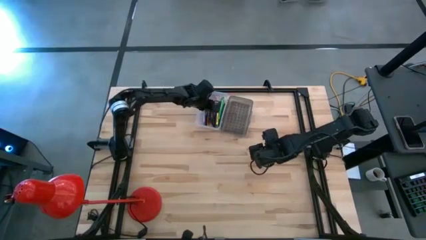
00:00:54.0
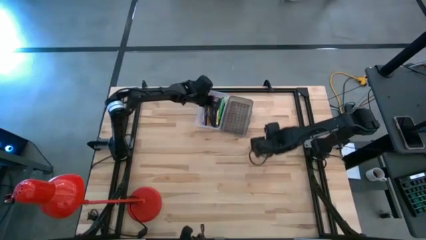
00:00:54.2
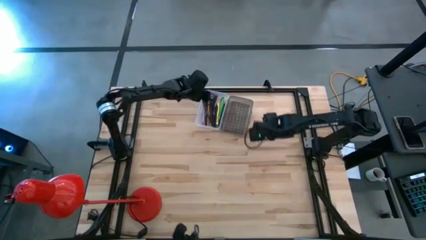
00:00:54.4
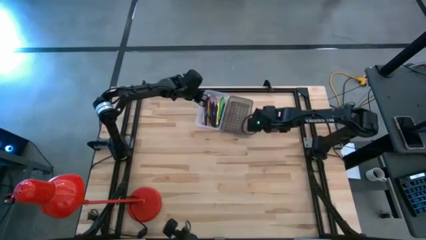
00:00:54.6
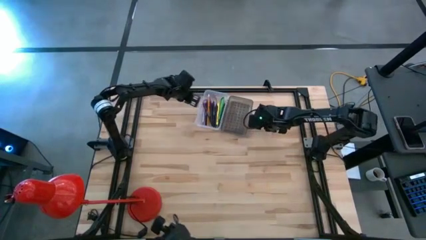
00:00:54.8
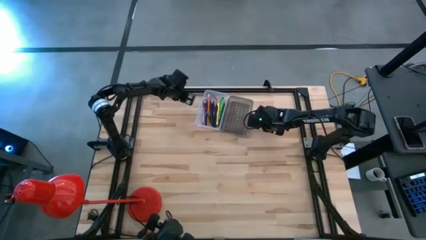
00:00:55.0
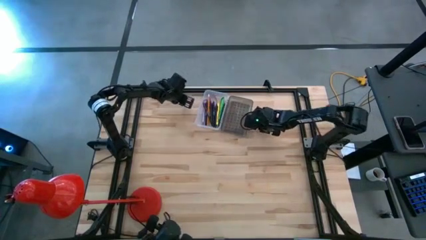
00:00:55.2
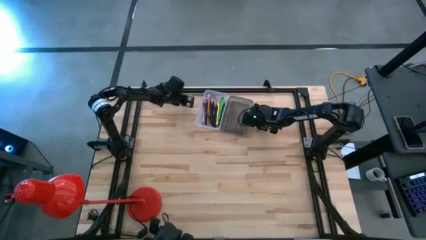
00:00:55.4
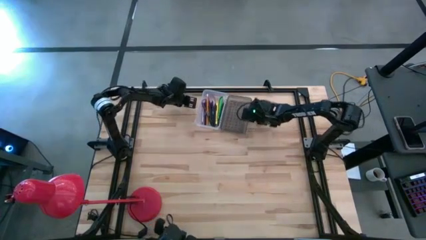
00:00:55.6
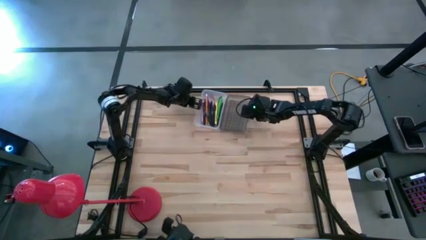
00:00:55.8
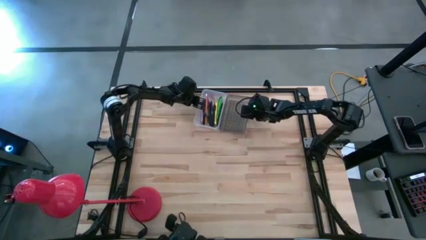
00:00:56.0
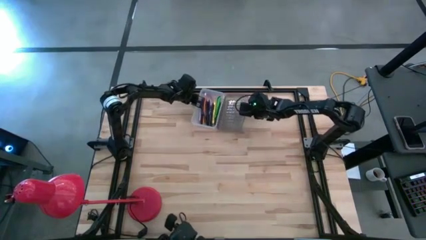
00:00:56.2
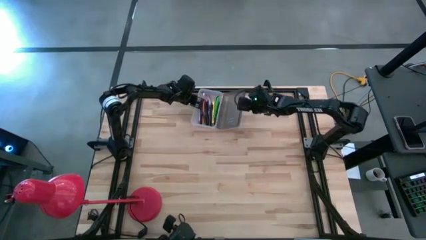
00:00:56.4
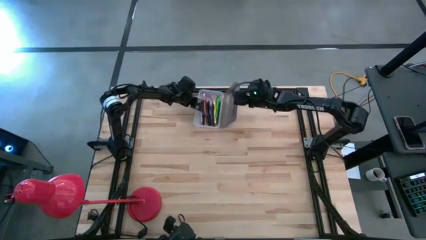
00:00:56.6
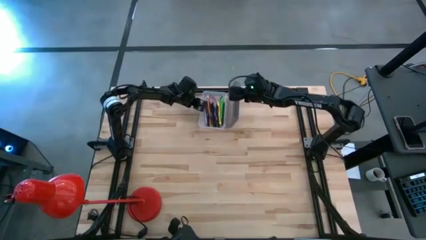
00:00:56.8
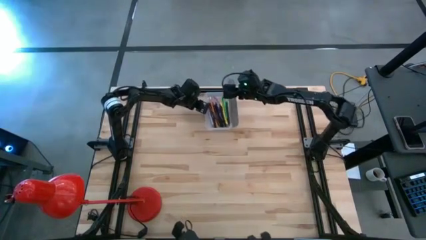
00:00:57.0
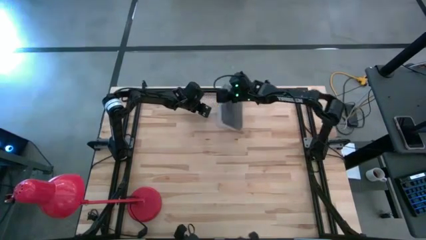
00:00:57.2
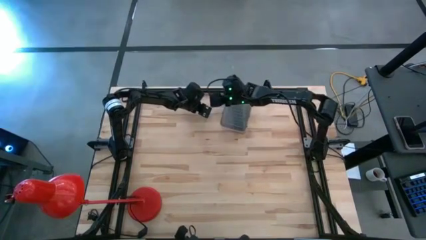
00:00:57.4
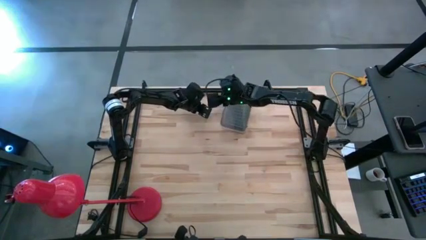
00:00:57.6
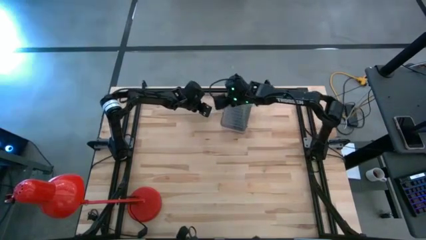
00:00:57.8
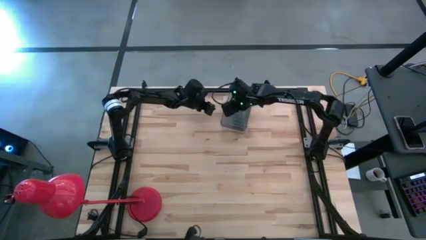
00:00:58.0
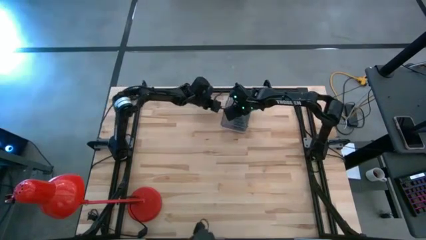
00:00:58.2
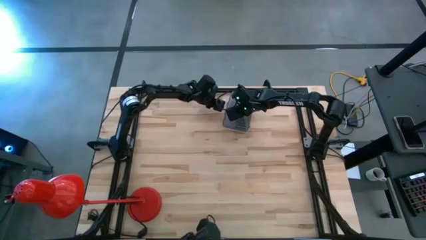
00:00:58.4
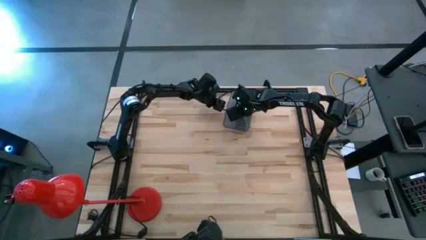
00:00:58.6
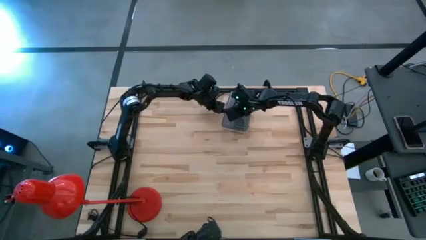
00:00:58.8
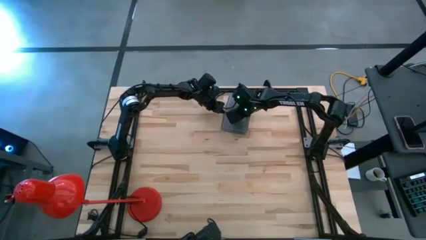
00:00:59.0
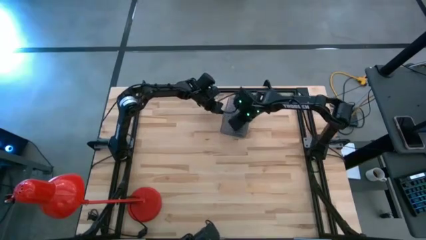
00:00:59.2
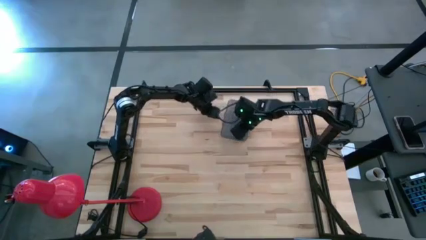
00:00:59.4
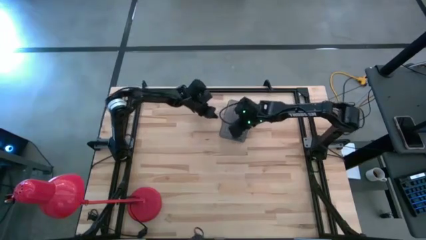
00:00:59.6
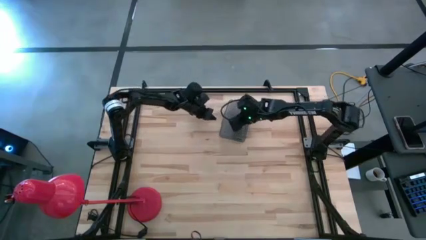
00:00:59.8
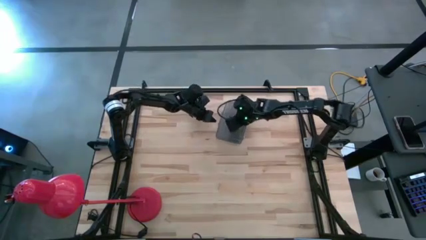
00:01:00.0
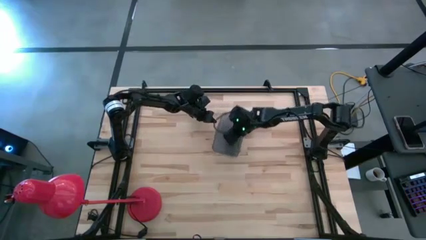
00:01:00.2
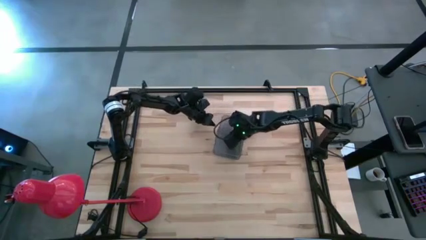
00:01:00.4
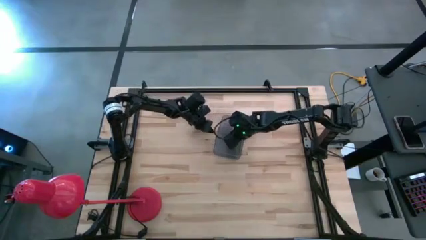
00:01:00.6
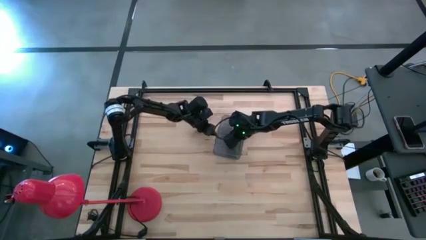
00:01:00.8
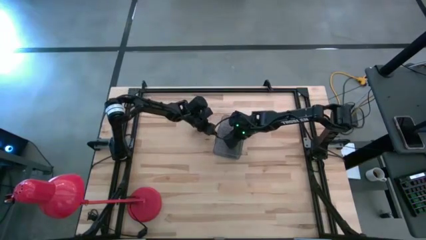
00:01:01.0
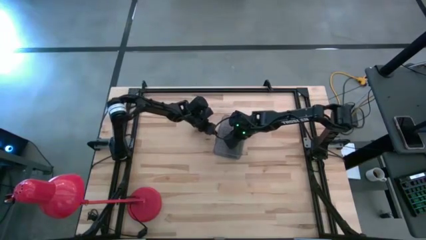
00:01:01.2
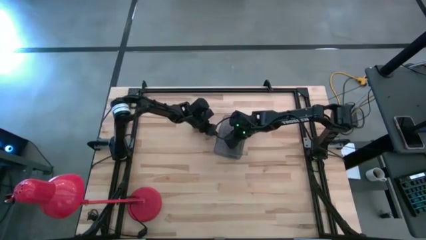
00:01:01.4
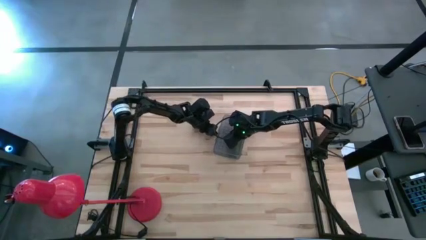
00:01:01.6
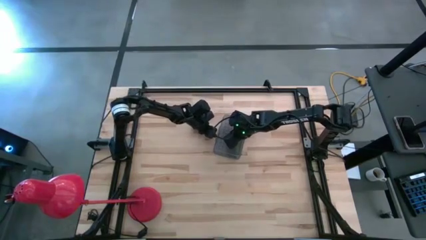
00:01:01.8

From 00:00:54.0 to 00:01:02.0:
Task: Pick & place school supplies into a supply box
Close the transparent supply box

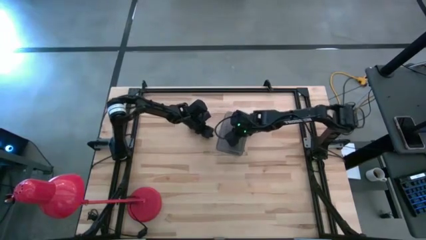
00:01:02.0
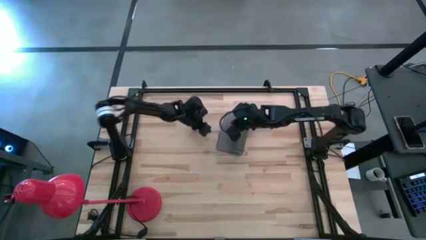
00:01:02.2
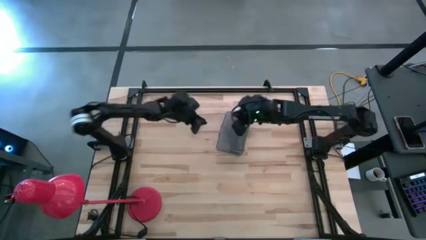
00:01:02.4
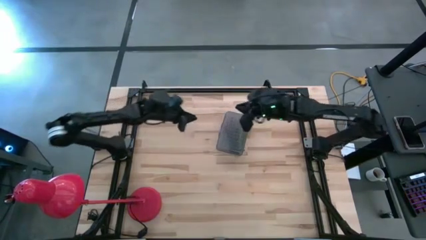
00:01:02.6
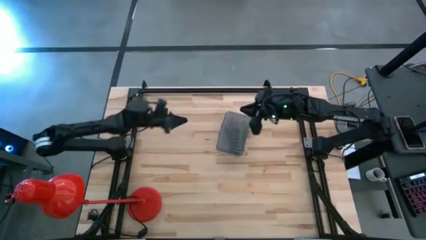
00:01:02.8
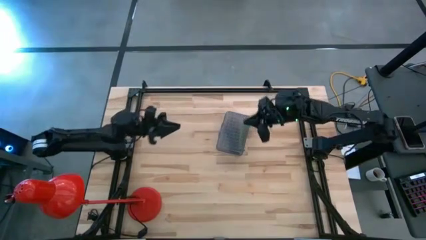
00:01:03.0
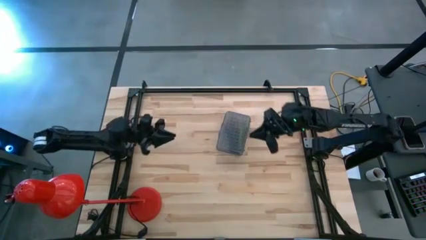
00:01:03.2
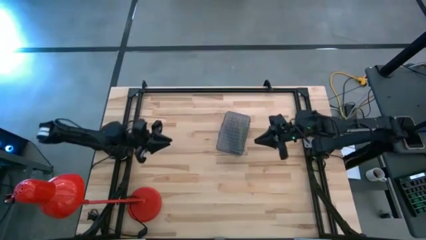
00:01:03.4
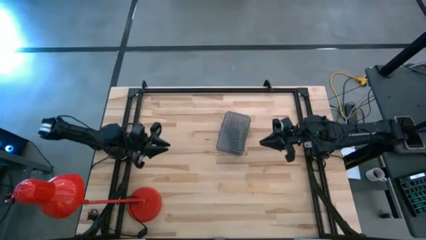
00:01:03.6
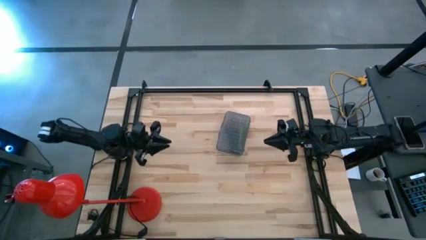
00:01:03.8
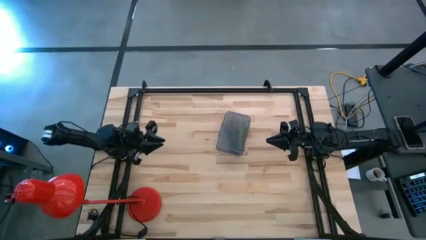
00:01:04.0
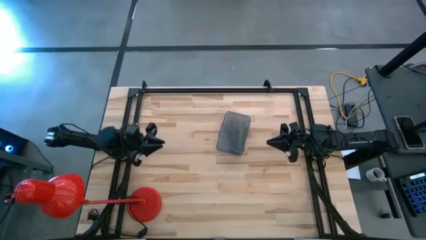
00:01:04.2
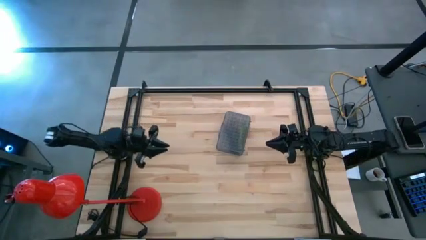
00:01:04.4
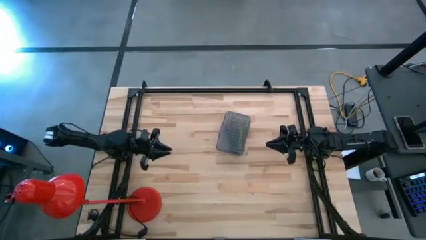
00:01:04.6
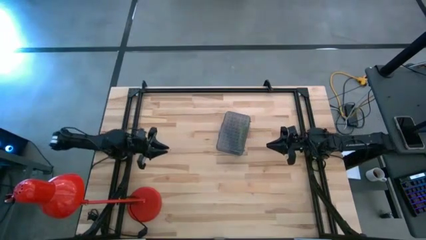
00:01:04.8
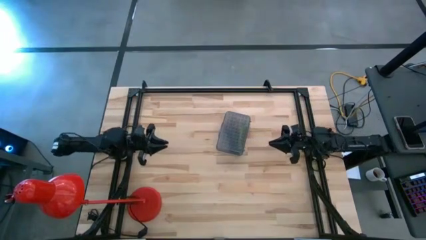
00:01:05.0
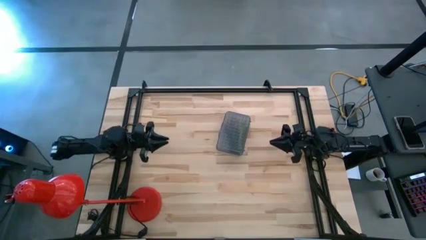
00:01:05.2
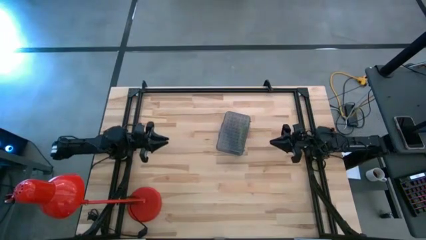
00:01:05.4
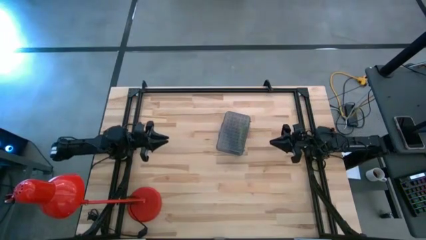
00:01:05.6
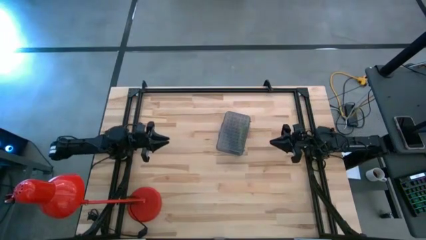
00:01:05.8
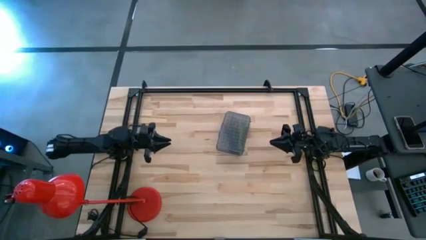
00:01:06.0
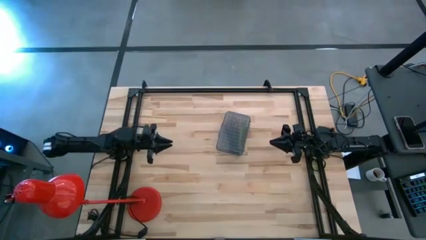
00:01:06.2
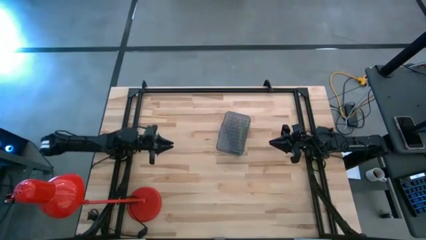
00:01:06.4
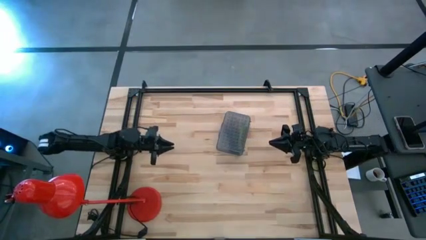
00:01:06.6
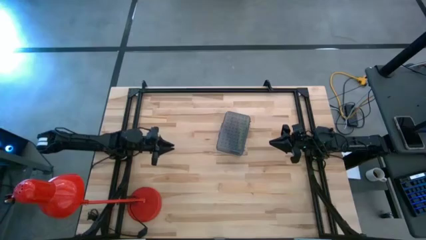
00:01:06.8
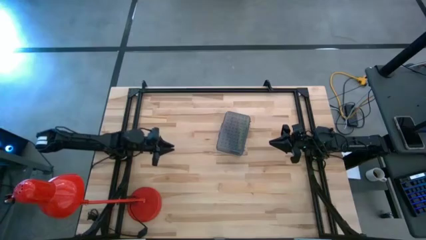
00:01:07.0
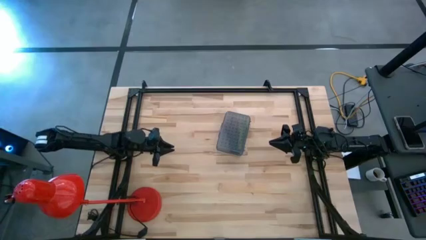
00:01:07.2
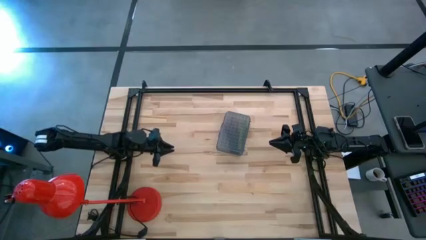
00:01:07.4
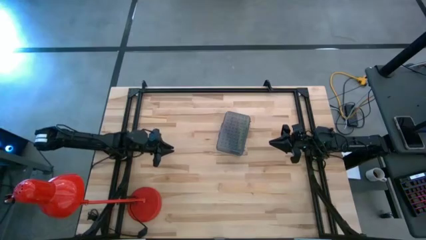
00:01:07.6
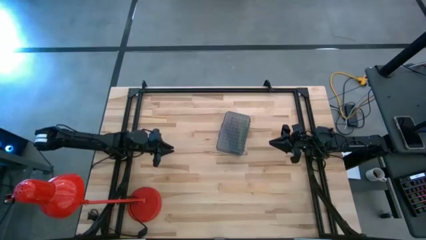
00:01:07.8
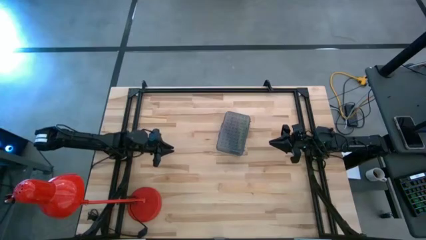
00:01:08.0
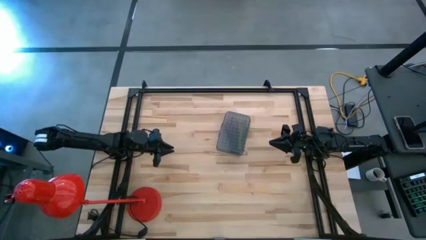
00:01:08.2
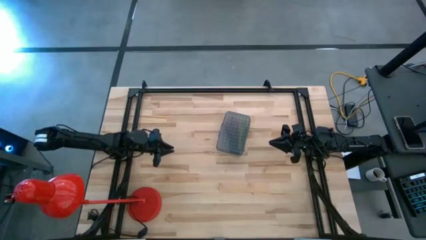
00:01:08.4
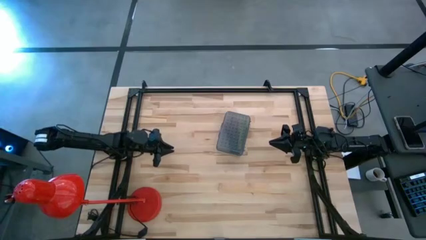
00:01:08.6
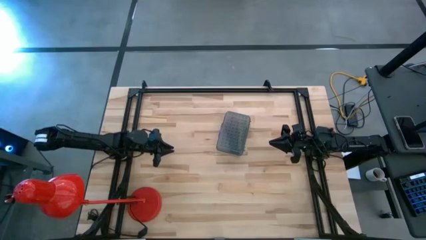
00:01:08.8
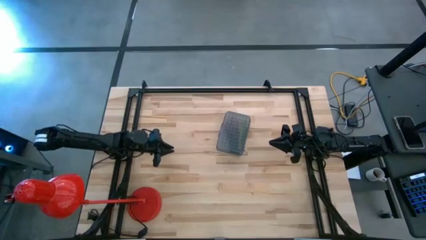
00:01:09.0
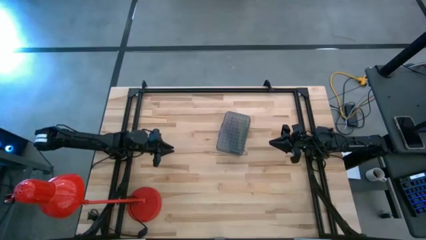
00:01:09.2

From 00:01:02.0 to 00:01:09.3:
Return to Home Position

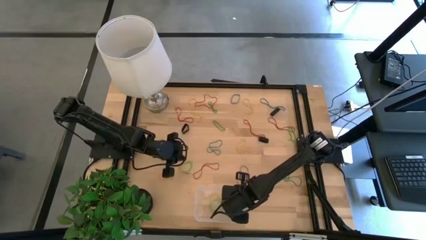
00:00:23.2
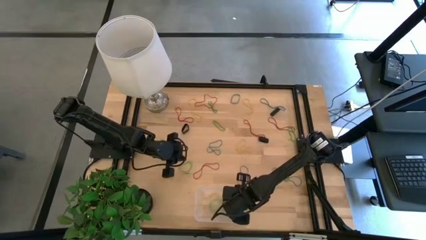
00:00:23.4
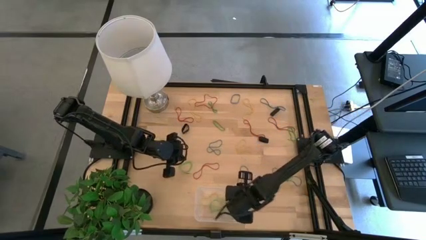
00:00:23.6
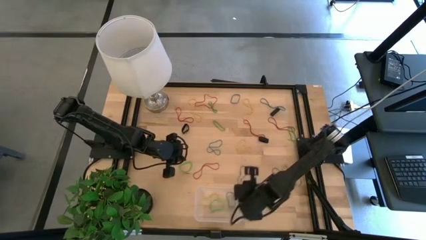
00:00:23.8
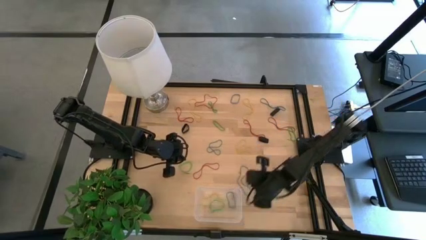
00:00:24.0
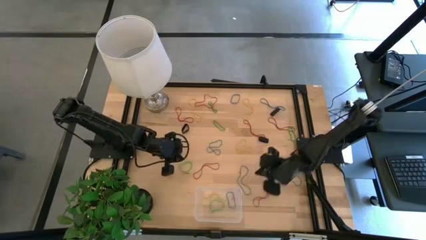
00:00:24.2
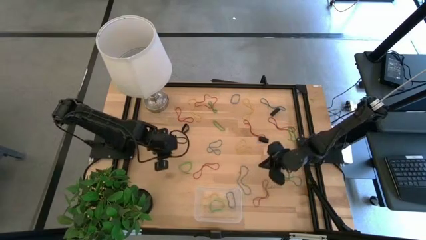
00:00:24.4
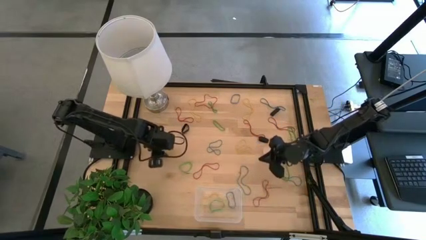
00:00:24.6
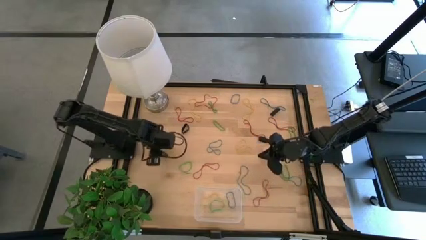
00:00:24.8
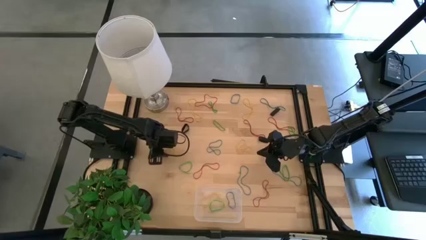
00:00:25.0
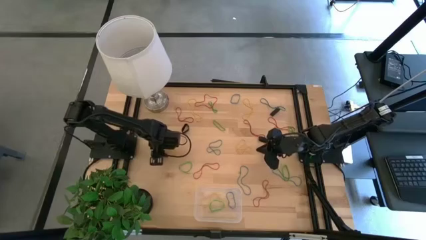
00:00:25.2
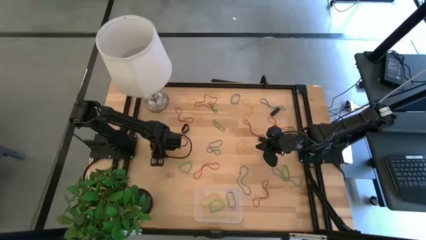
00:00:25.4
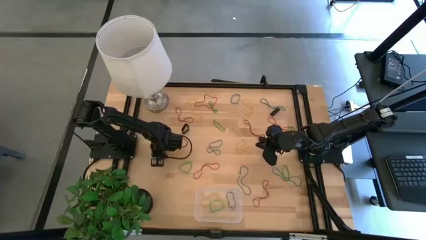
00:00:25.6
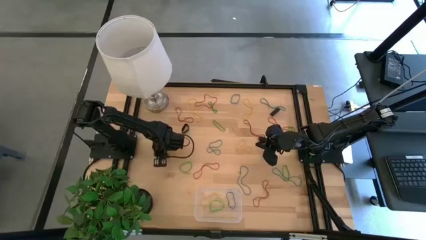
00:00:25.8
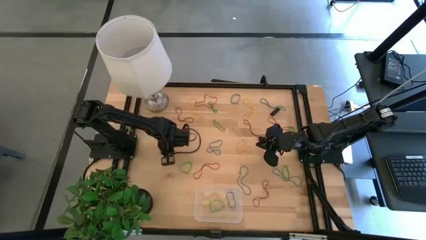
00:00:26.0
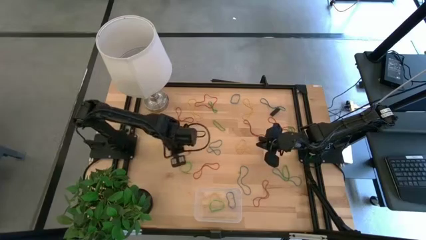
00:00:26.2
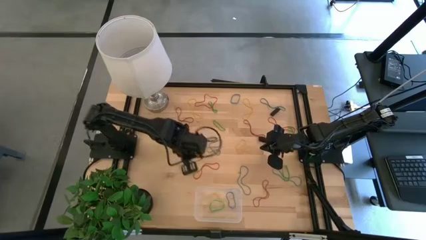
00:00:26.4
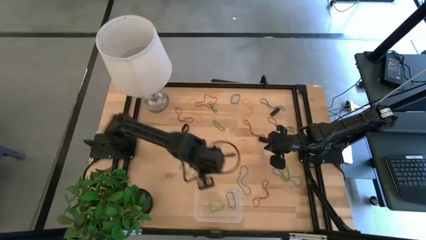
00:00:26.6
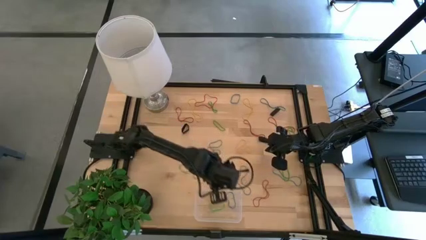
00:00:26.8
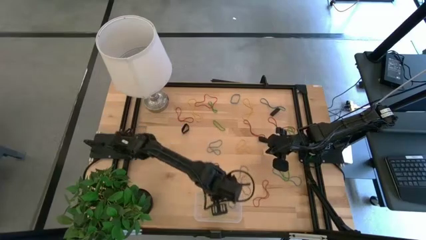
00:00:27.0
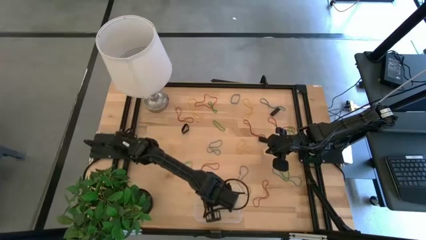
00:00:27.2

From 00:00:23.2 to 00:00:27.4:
Task: Pick and place rubber bands into bin
Put the black rubber band into the transparent bin
